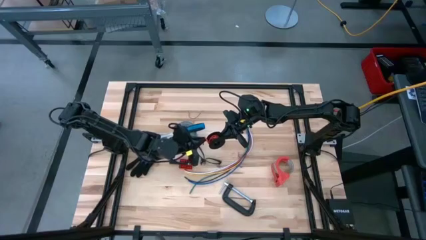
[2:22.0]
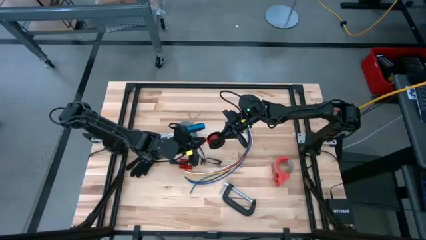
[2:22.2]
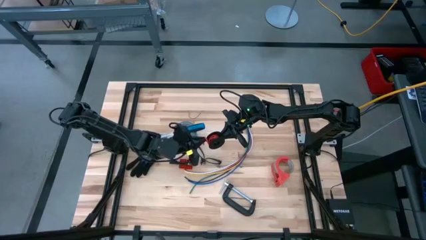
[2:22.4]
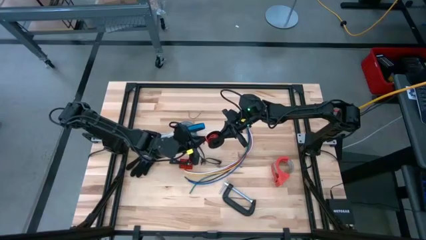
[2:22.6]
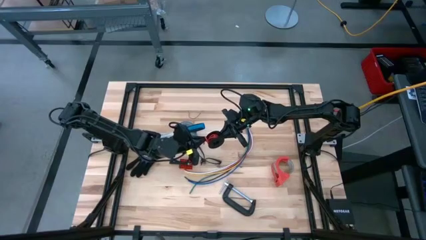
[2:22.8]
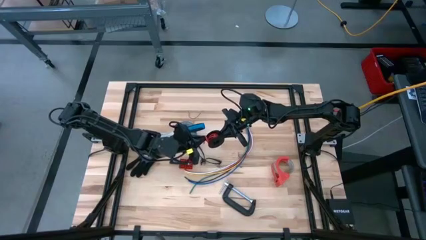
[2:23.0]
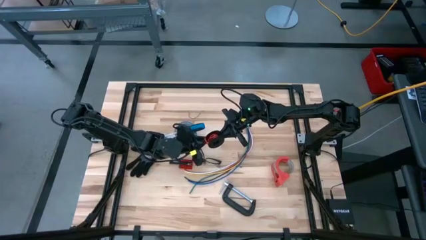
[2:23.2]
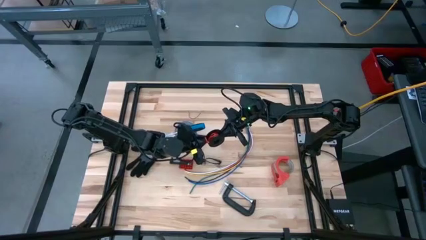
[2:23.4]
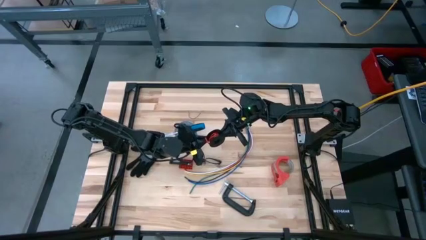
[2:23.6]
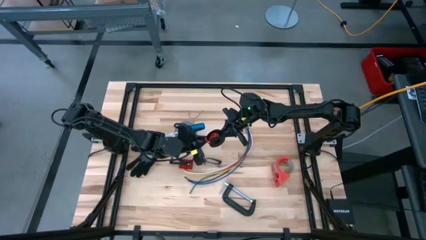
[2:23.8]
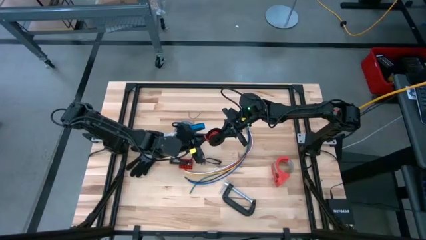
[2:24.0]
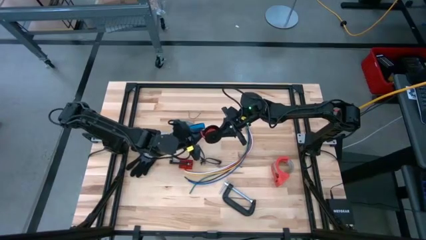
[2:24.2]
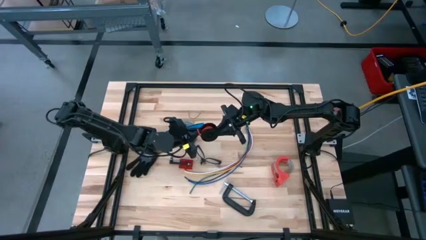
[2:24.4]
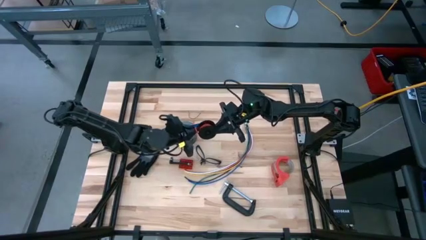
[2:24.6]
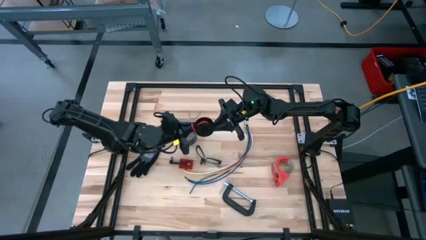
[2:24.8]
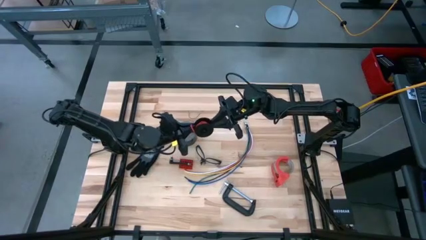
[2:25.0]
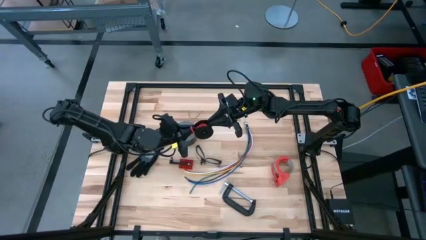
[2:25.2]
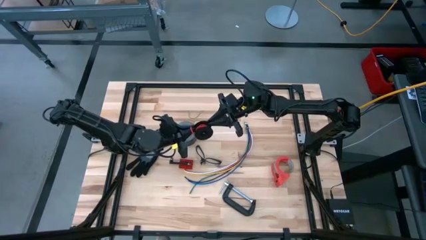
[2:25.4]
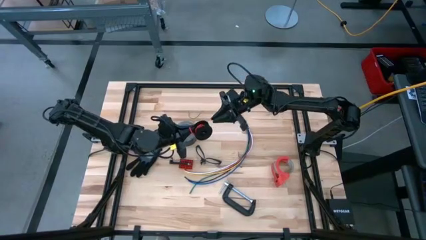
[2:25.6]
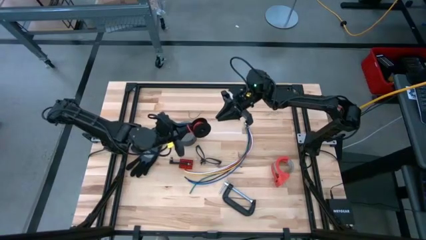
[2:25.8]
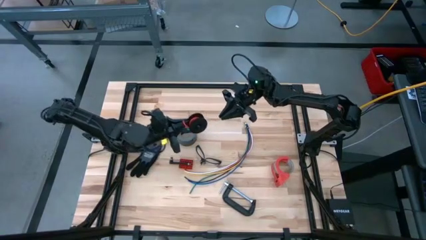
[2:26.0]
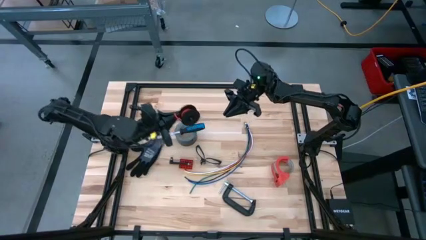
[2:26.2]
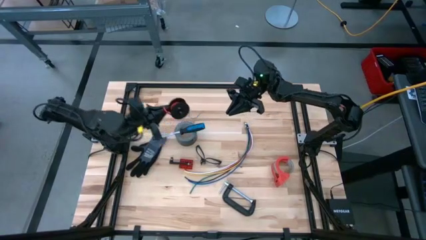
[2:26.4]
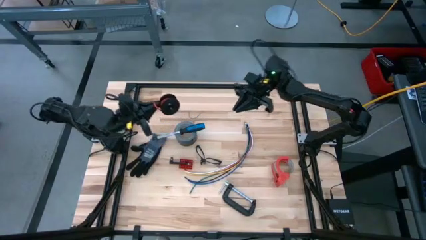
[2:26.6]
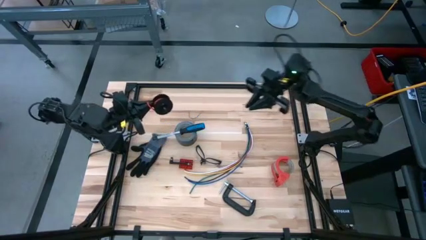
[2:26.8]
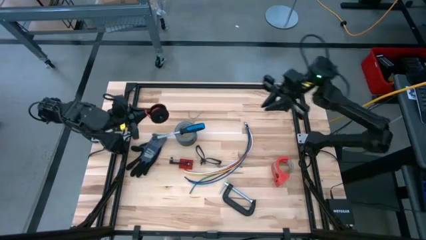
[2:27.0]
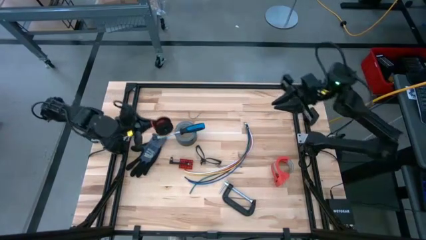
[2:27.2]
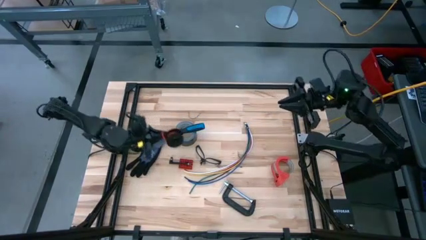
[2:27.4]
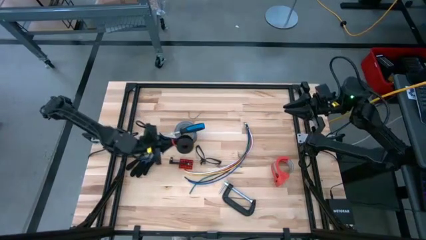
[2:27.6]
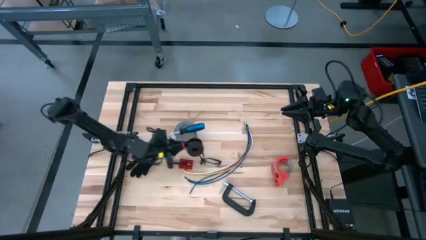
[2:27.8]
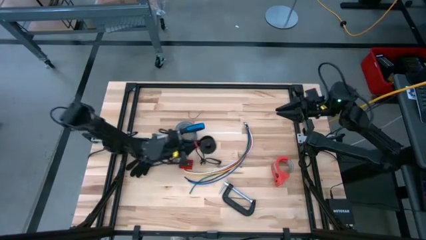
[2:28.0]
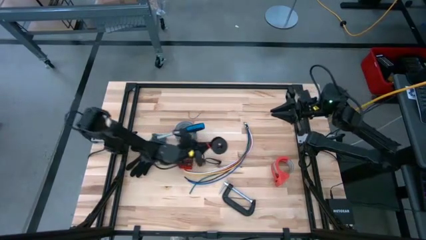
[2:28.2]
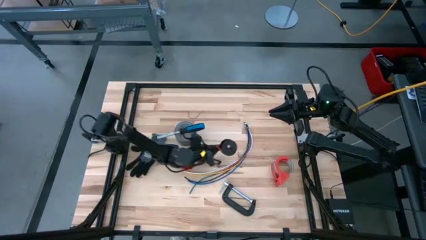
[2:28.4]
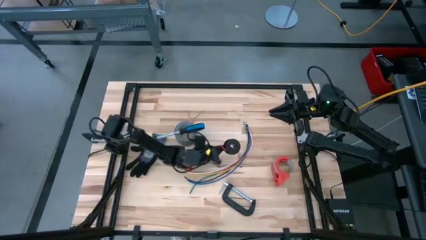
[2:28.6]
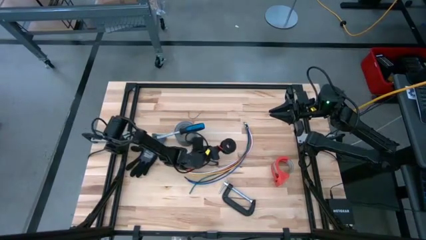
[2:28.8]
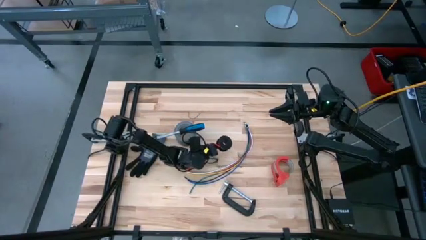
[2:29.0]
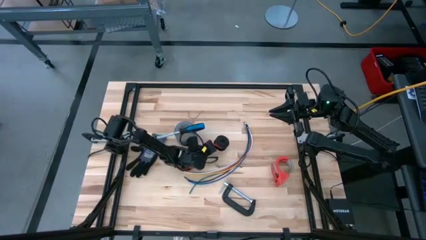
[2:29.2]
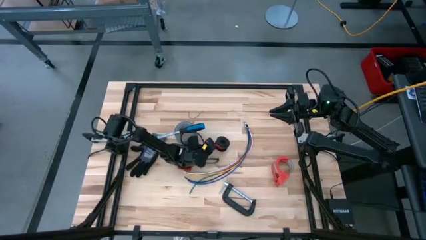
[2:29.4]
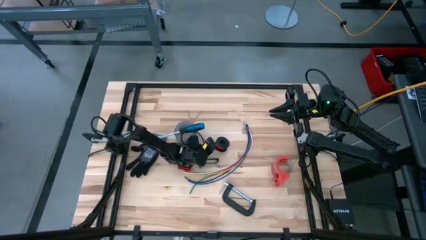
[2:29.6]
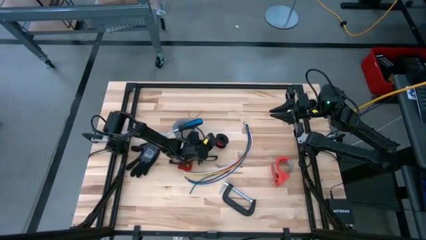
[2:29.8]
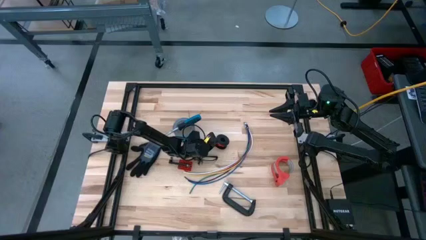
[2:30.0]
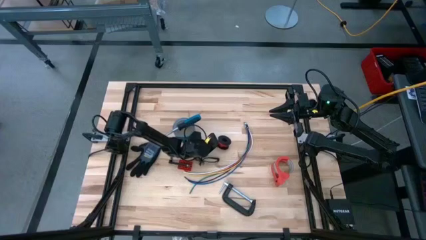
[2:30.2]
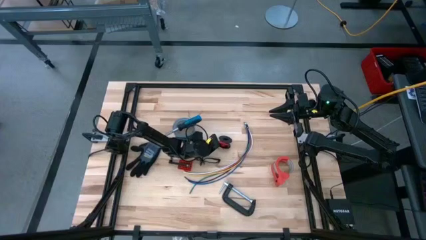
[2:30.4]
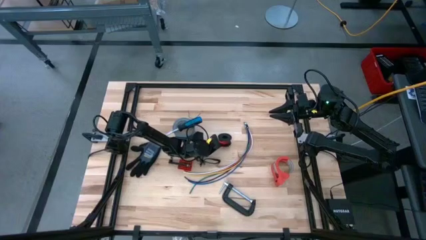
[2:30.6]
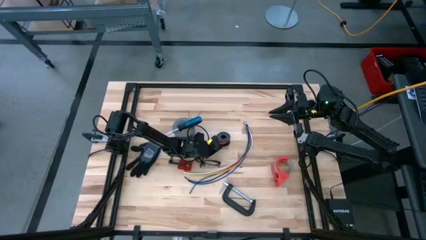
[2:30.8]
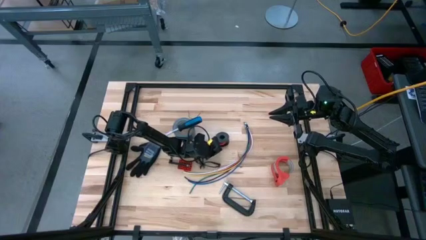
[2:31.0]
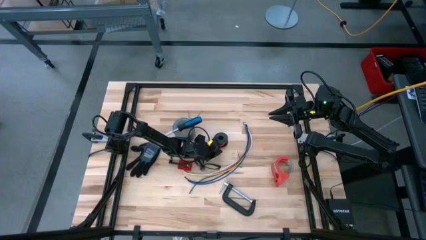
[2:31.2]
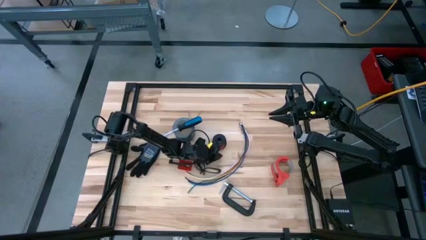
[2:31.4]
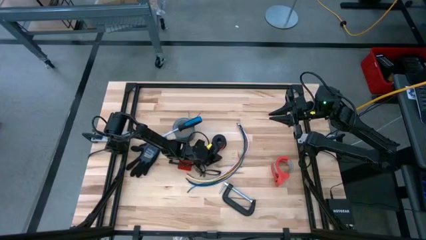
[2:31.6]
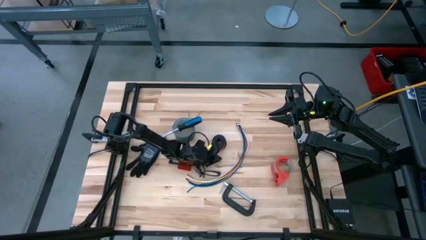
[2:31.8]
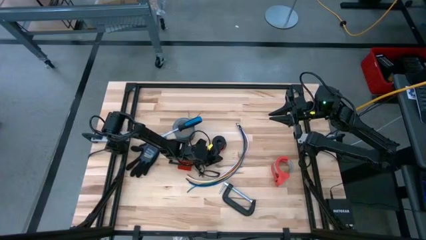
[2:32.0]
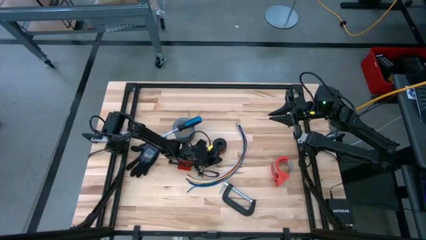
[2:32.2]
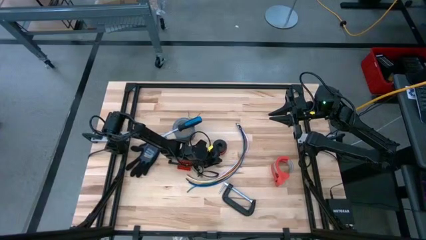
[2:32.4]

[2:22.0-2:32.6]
Task: Coil cords
Coil the red wire onto the black spool

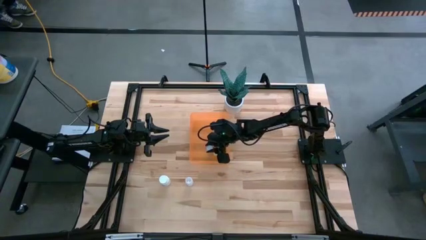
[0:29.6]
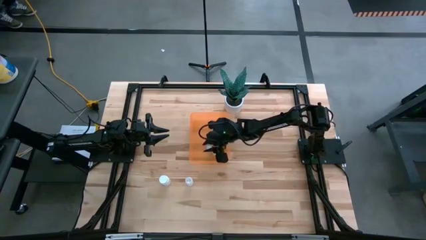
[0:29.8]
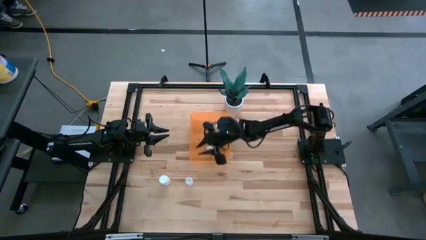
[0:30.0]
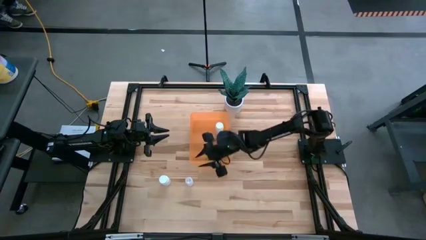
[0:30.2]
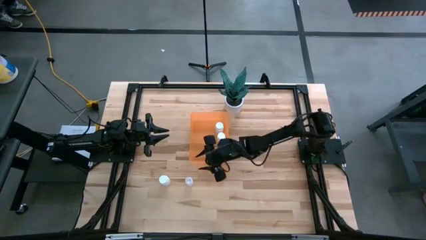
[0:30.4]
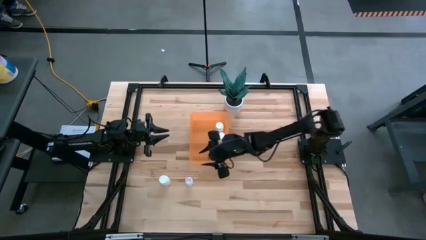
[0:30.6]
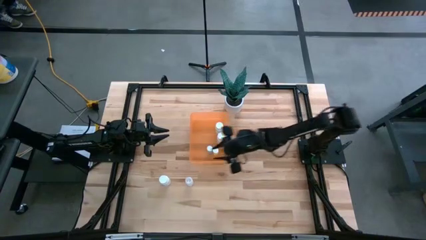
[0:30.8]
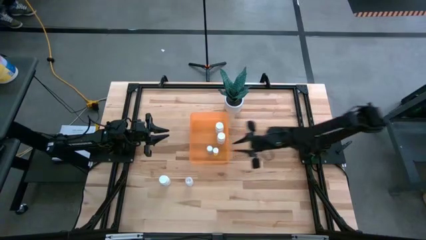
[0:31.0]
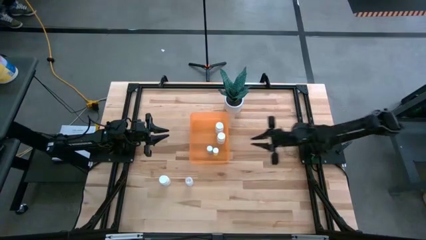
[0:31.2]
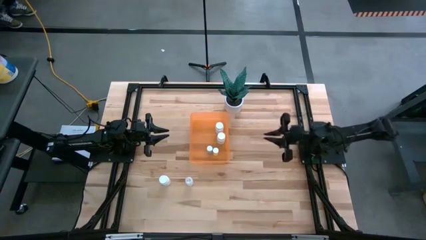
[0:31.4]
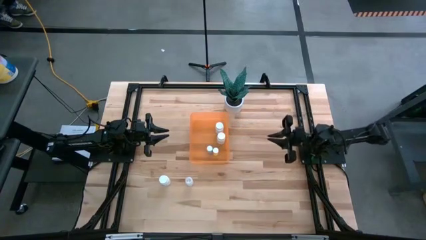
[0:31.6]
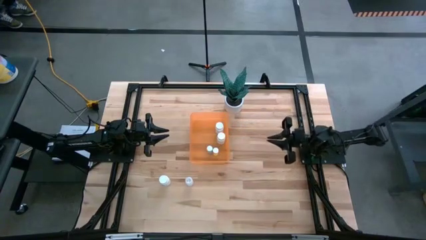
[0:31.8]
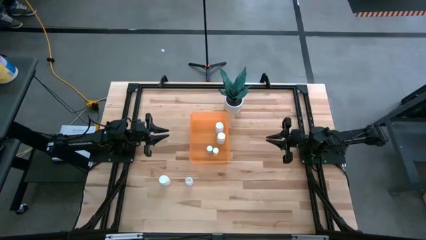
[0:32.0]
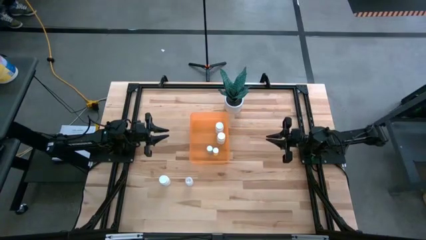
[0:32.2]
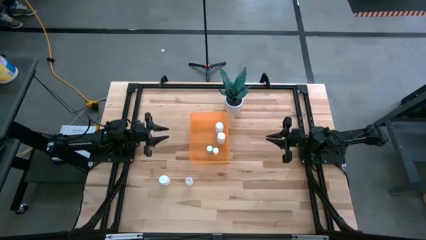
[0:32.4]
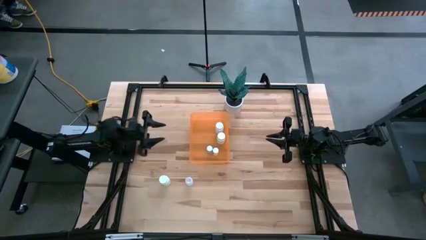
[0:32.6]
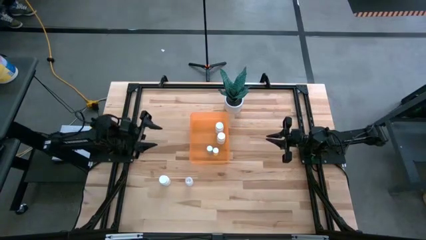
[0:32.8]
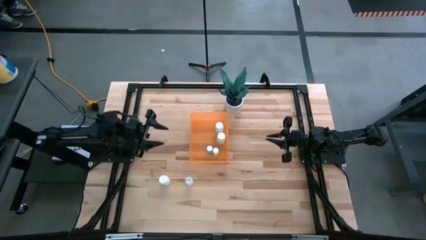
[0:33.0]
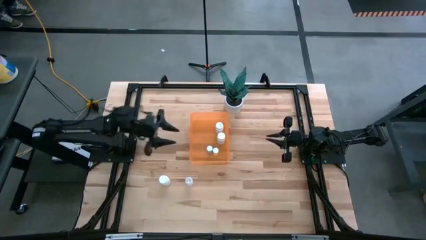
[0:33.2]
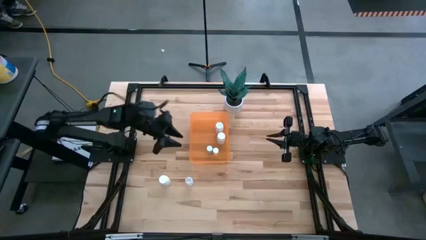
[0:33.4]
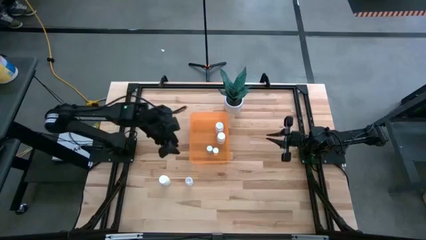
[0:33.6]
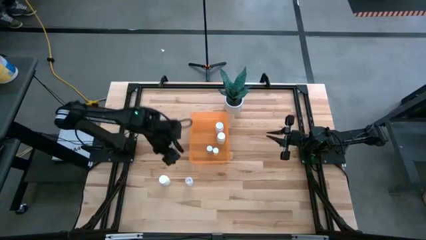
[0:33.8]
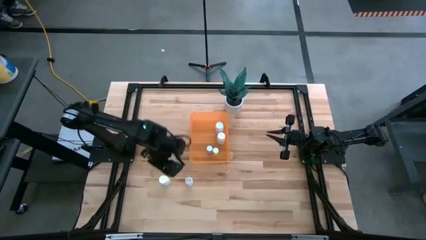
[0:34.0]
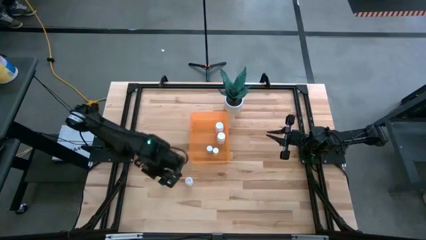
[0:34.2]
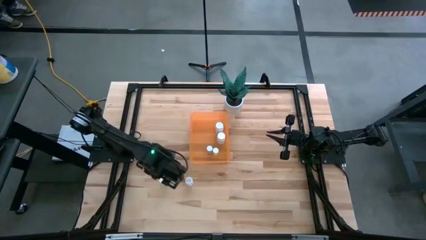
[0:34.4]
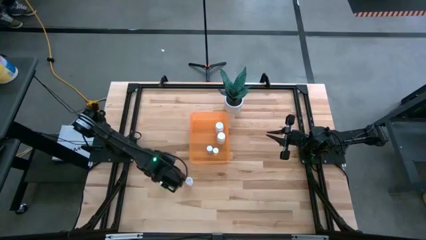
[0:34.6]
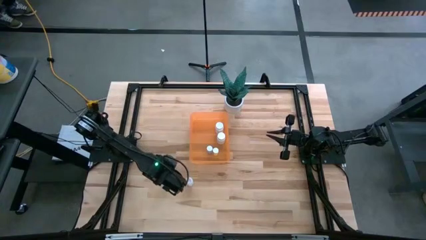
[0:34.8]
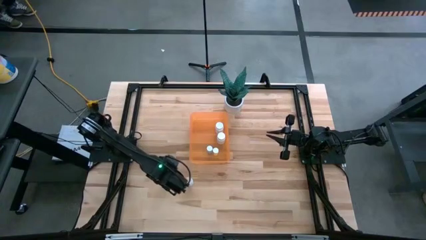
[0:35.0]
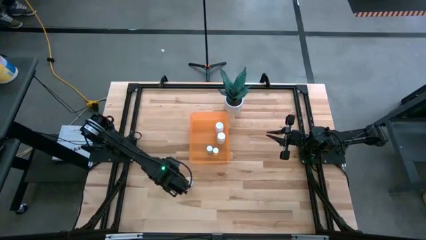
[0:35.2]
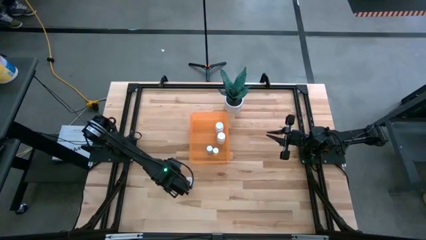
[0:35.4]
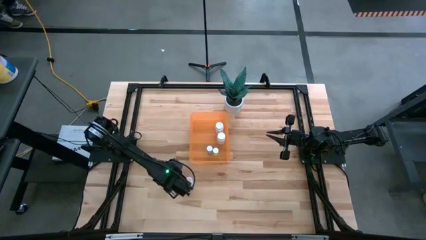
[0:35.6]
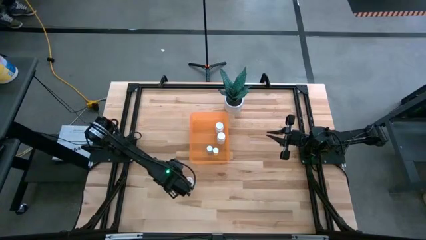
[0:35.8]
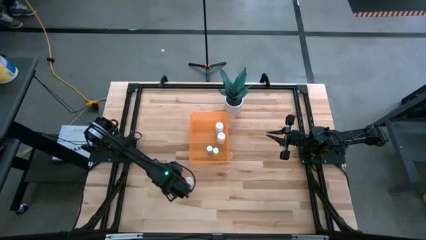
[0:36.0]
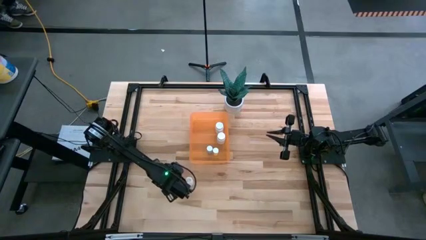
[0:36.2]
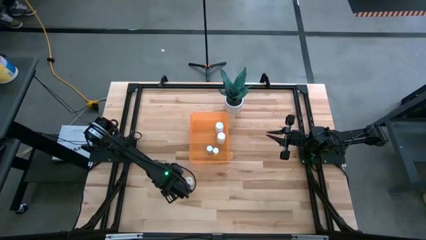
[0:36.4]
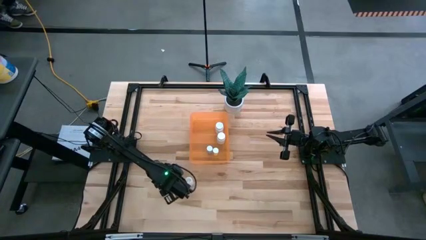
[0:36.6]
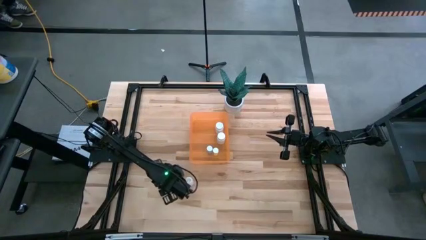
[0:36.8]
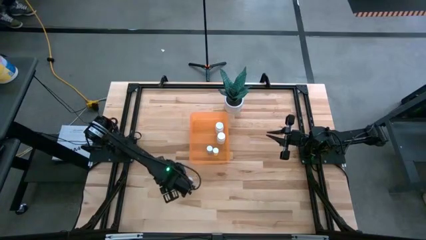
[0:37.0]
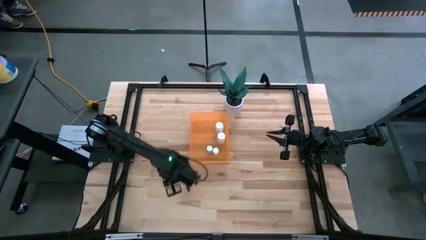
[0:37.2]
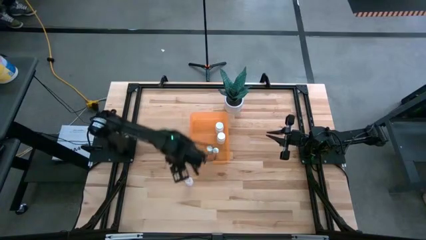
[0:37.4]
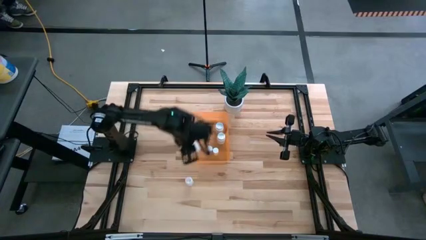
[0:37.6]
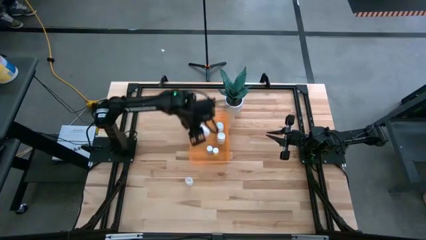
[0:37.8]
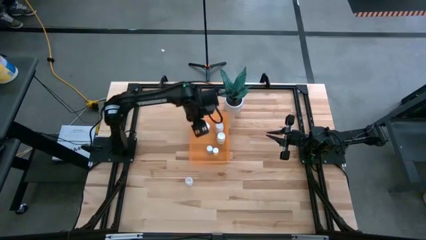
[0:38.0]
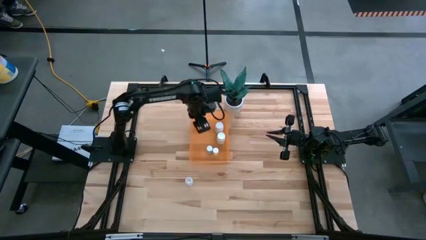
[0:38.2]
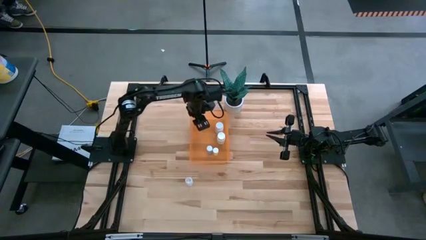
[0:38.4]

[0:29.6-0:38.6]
Task: Pick and place pill bottles into a basket
Put the white pill bottle into the orange bin
